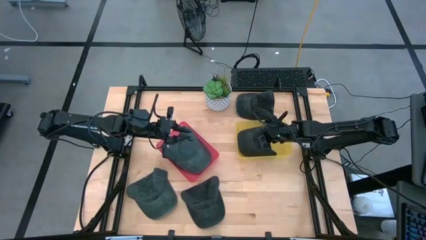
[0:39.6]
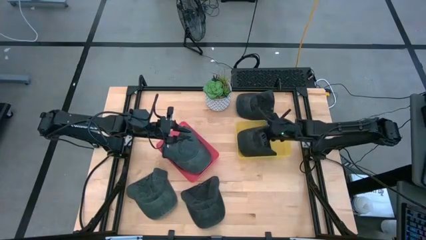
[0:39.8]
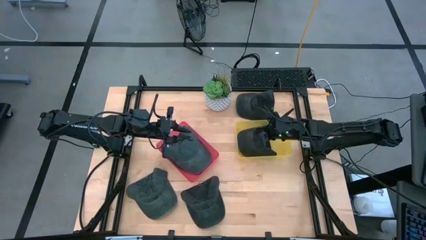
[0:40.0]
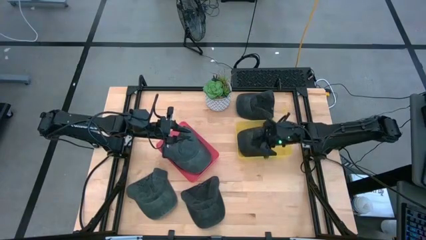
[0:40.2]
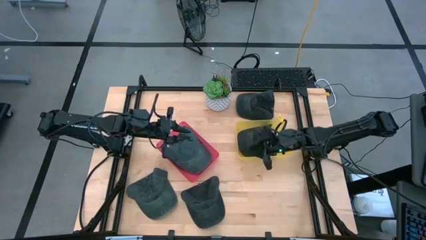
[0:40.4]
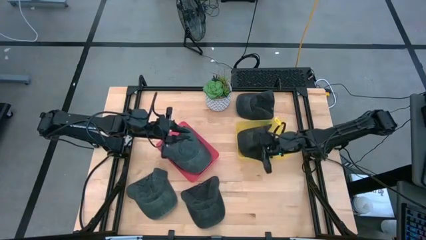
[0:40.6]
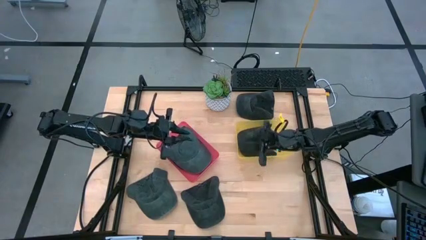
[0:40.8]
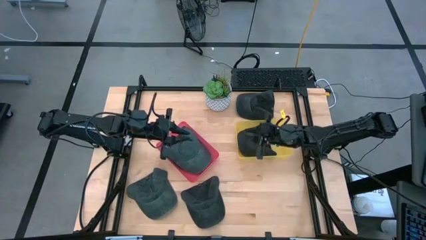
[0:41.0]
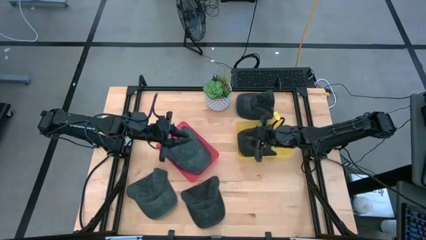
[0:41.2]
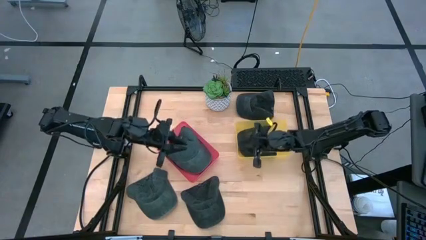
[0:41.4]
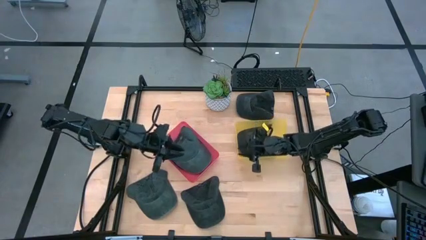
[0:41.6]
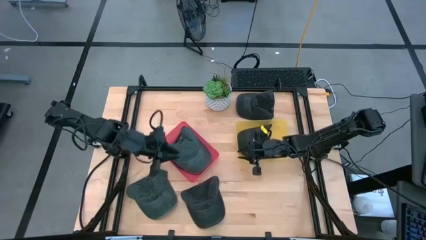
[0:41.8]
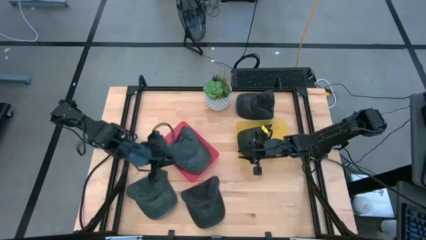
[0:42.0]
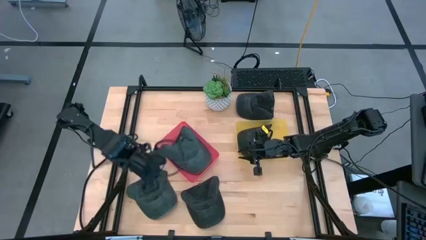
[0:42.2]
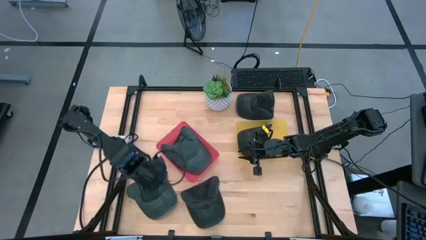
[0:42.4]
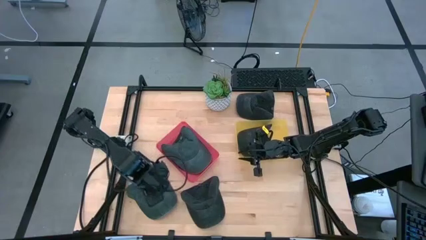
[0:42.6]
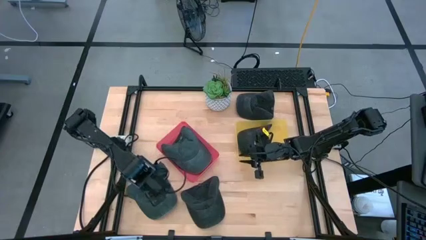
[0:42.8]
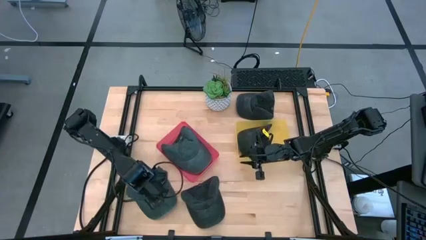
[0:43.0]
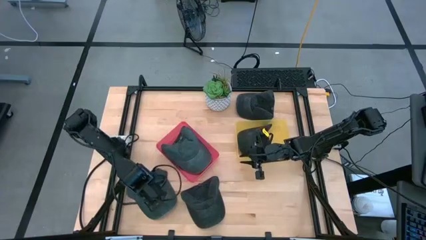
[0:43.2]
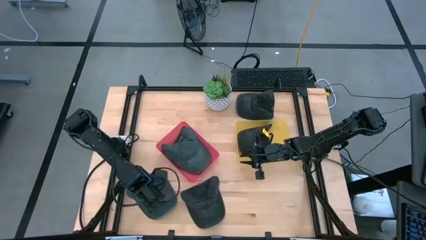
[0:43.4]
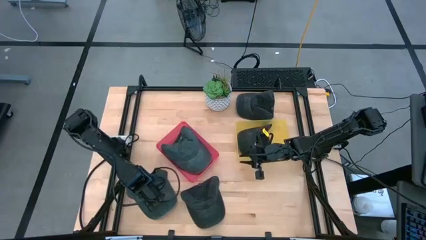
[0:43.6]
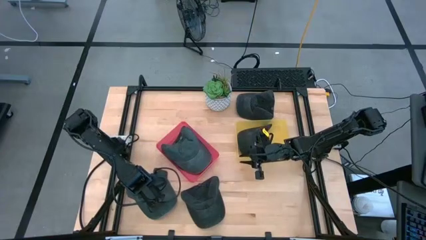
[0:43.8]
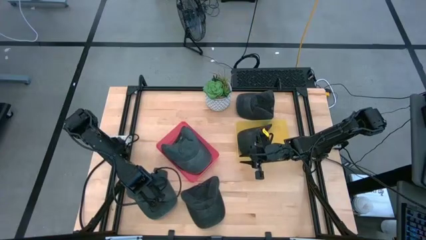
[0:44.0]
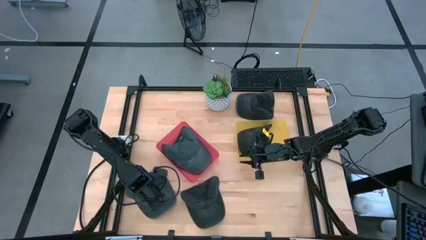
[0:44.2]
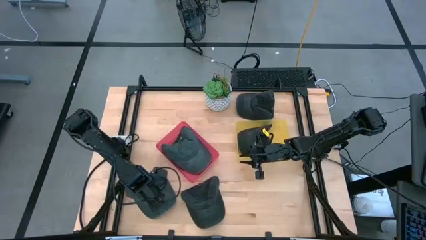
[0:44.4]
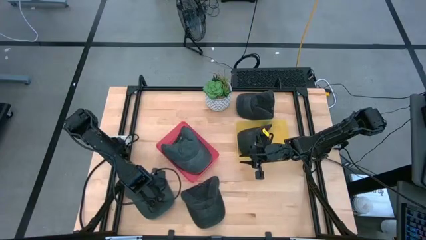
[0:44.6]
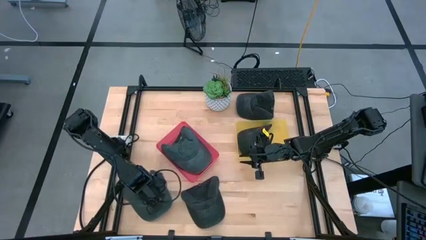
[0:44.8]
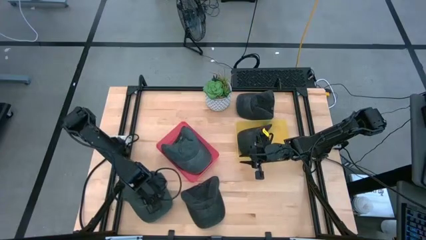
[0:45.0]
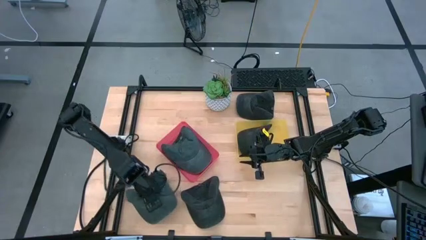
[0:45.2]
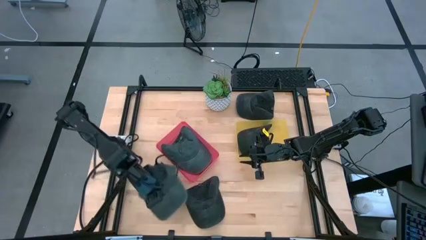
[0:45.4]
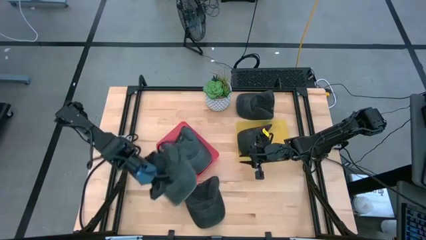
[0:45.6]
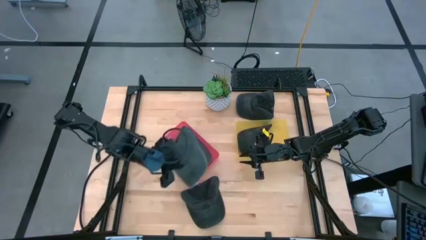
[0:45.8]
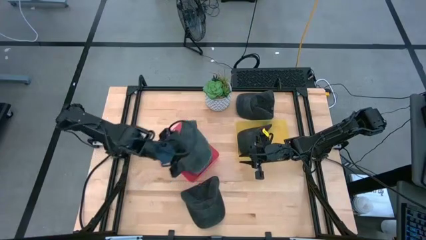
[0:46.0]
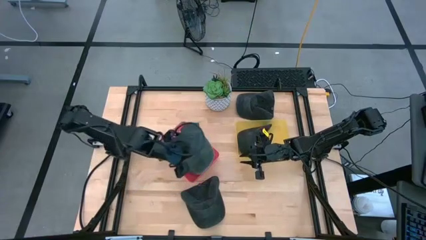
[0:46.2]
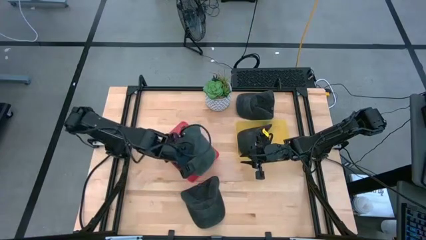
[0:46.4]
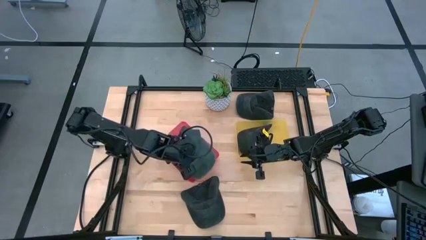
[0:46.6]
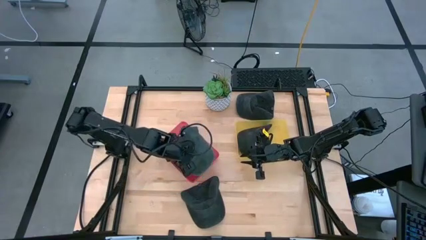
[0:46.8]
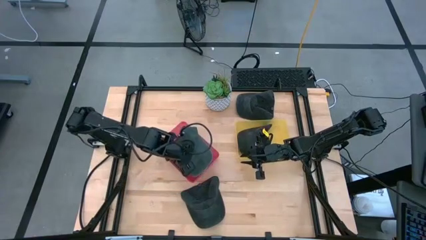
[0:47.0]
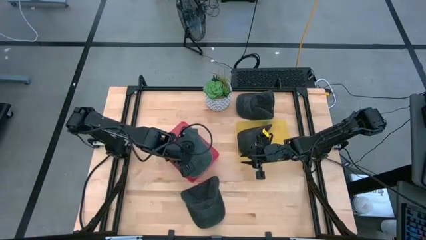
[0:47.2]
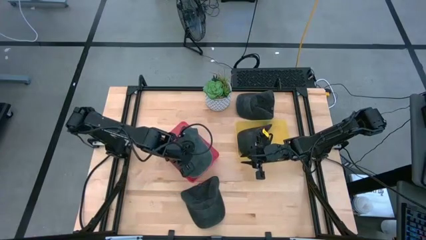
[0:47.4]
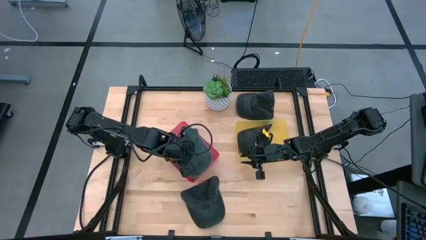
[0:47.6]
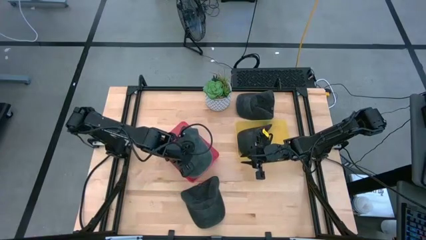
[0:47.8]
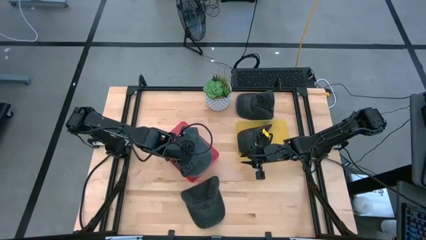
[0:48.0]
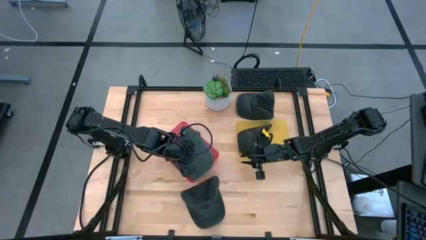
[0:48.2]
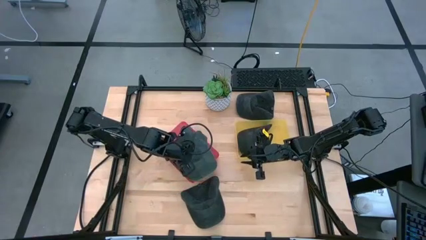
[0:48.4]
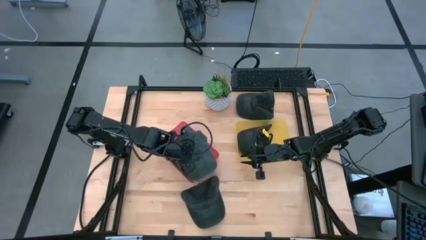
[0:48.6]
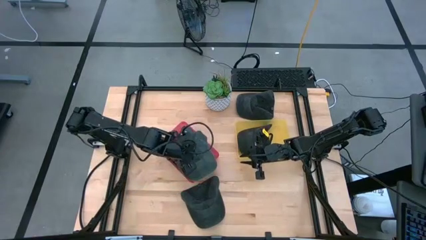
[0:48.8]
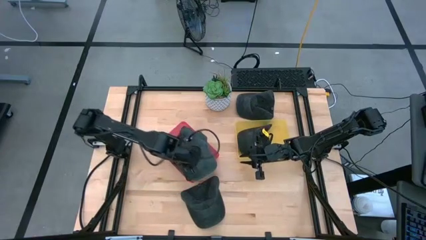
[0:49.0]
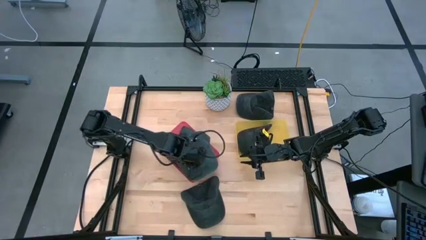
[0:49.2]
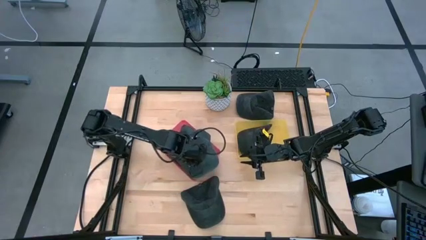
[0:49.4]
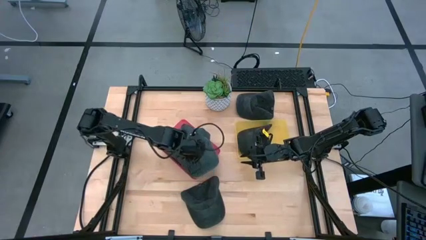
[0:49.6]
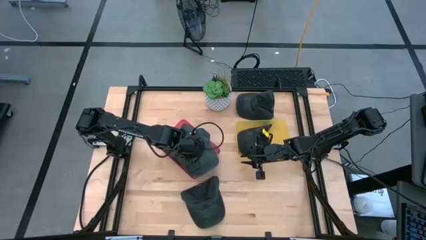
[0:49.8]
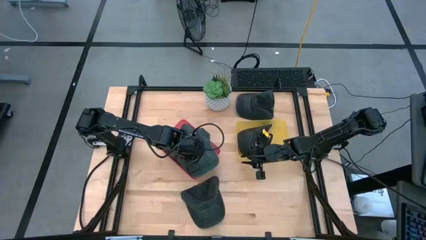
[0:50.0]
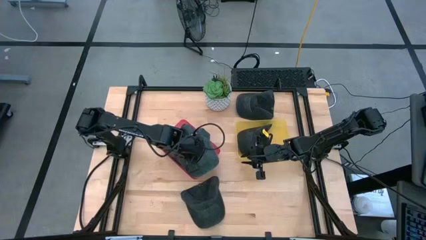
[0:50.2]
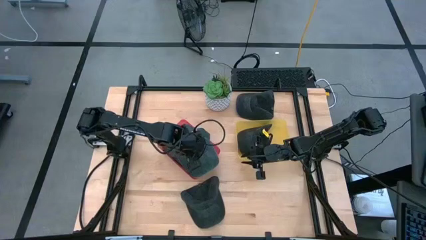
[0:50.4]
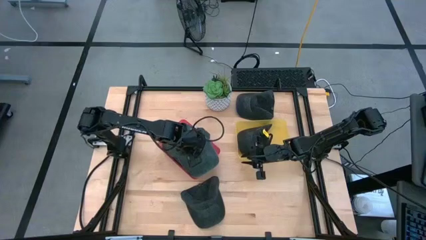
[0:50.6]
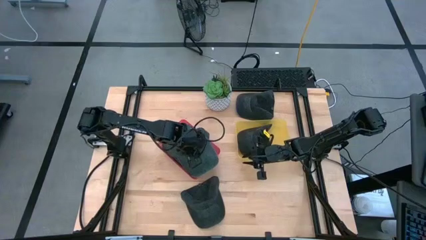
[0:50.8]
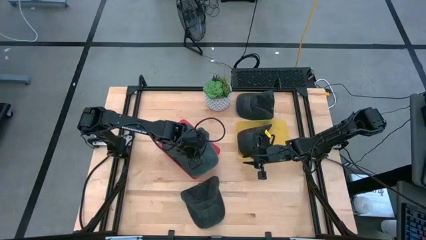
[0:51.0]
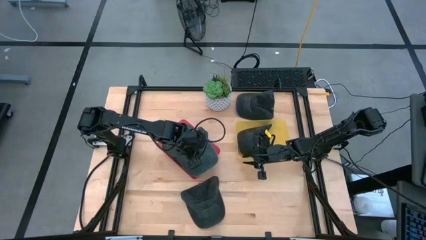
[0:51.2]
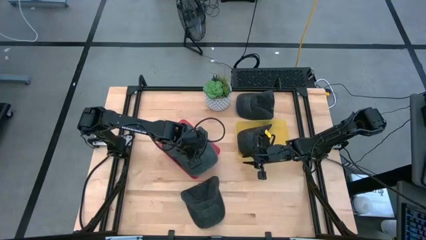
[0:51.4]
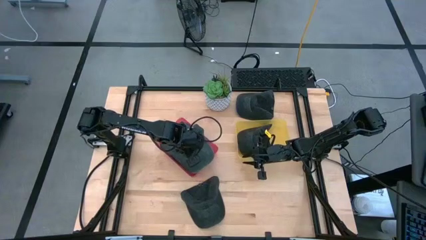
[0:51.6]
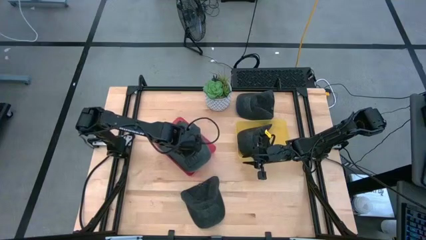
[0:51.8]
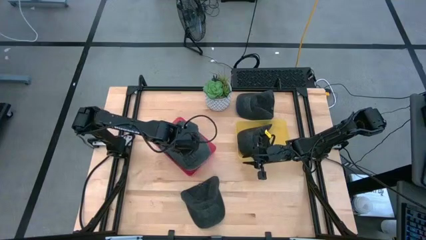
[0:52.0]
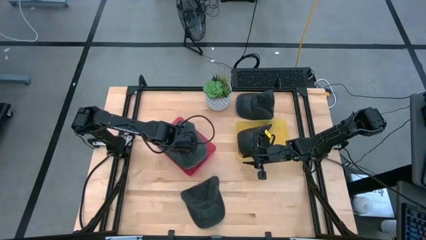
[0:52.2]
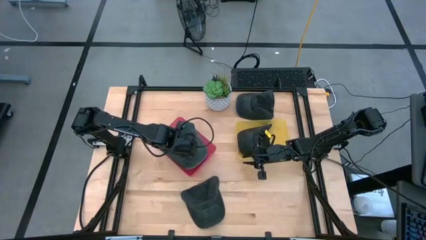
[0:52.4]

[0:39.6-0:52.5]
Task: Pick & Place hat
Put the dark gray cap into the red bin

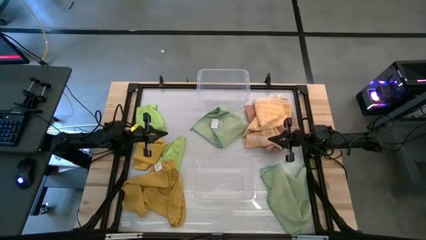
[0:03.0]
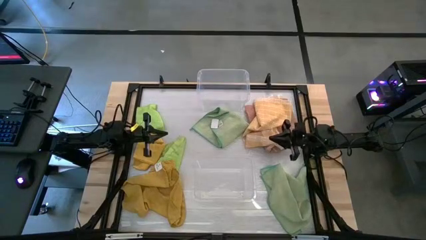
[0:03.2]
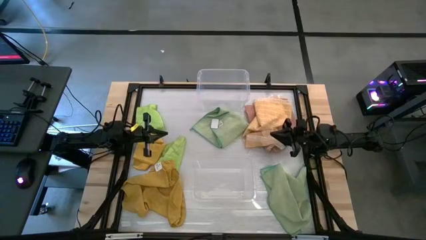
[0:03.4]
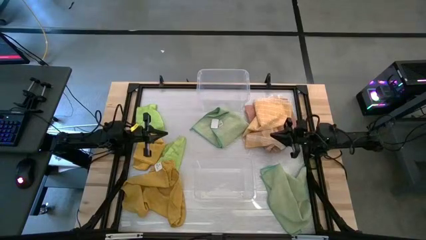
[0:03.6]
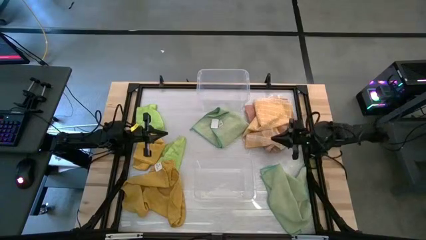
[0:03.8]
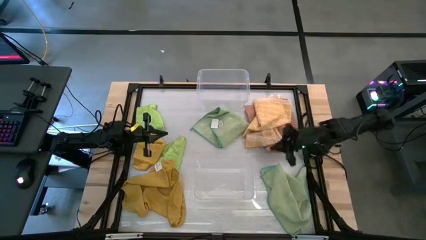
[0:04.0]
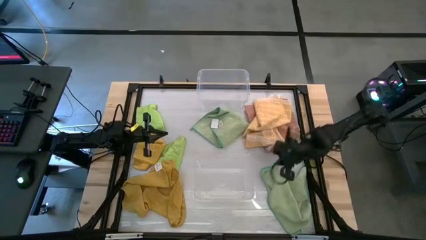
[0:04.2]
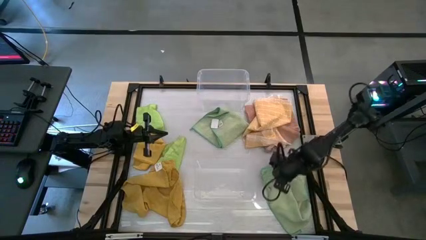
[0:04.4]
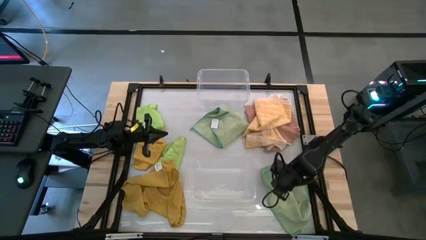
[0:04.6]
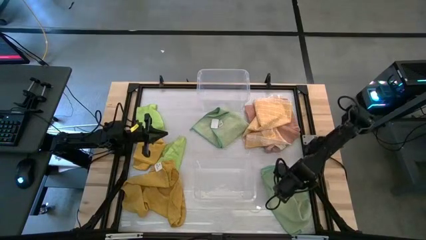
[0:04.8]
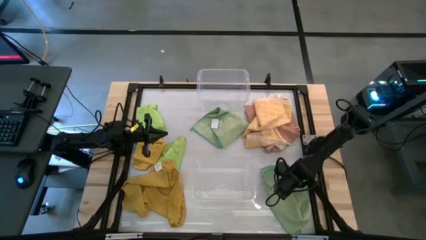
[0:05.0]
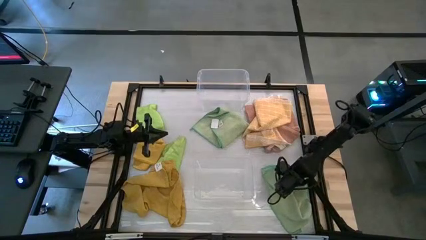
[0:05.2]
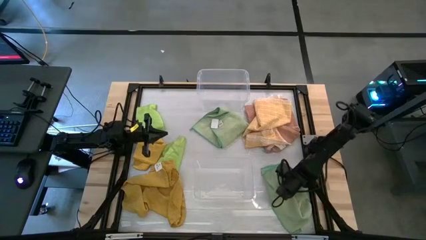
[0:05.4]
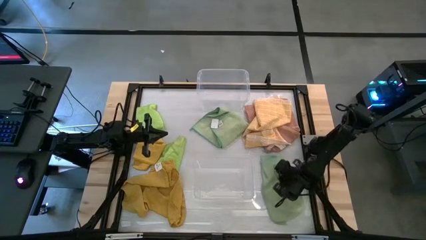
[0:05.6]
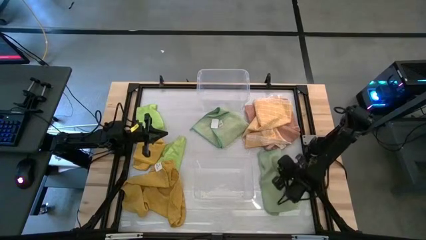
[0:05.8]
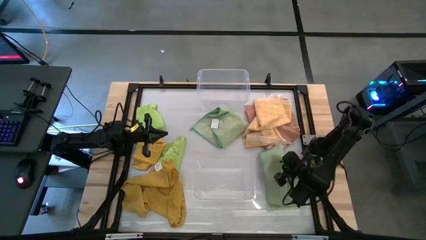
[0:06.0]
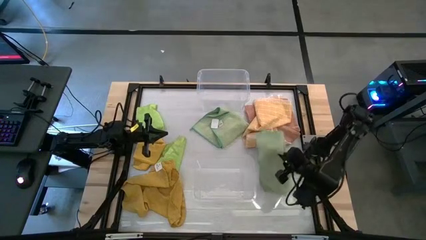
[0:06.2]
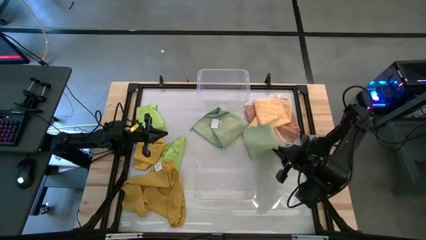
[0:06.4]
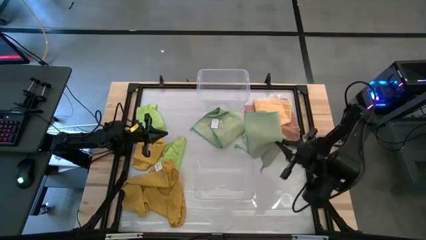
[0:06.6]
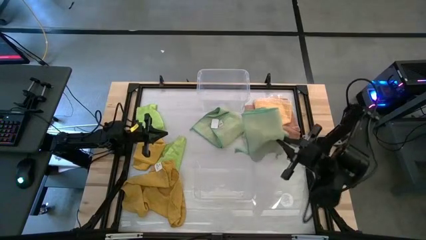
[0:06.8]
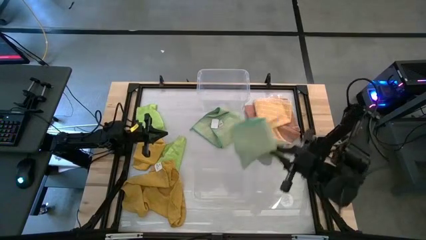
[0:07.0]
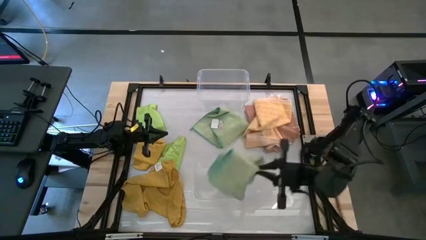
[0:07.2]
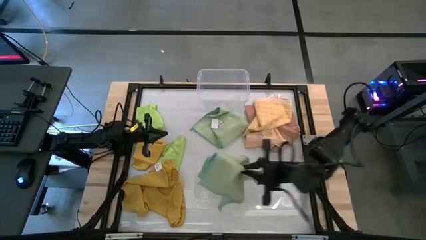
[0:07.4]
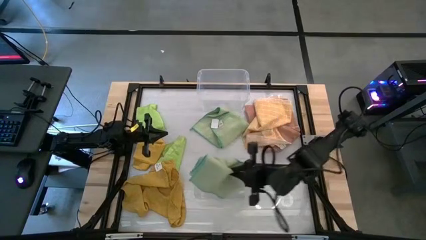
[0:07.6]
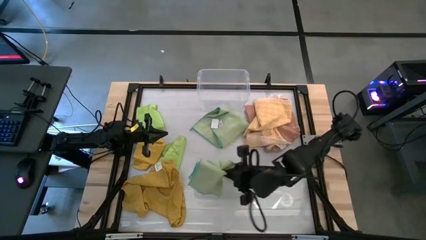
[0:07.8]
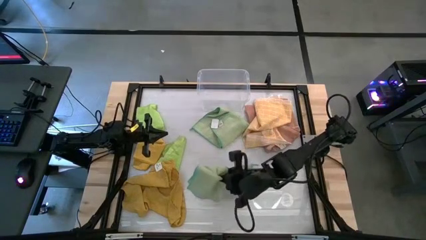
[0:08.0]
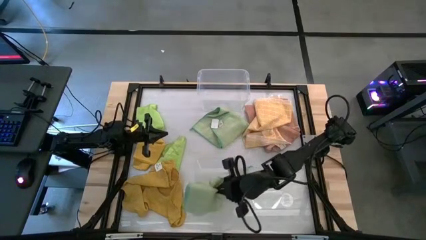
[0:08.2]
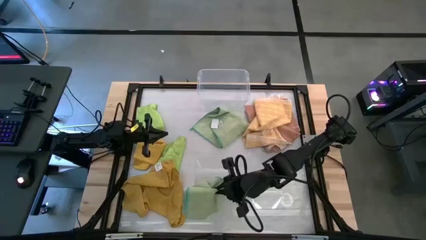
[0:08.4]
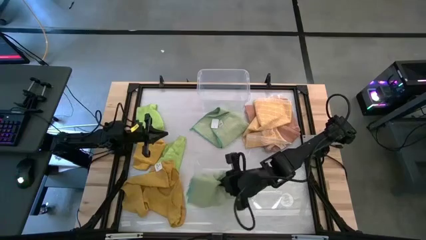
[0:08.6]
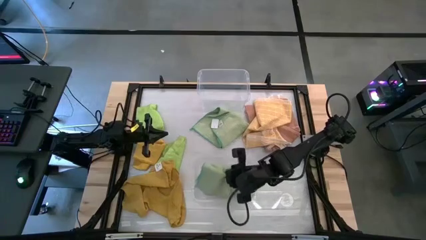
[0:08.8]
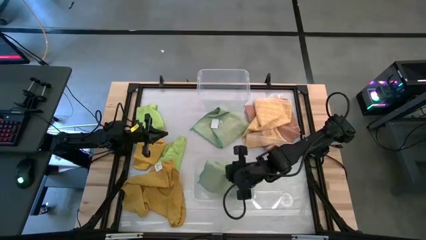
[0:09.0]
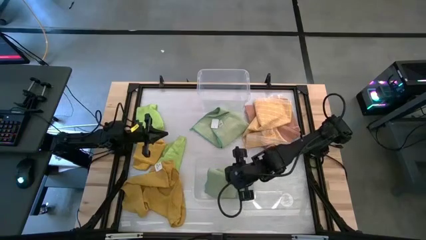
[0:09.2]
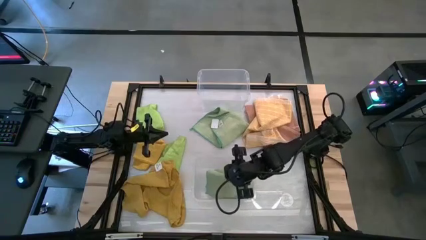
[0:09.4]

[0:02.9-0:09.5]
Task: Sort towels by color in basket
Put the bottom green towel into the bottom transparent bin
